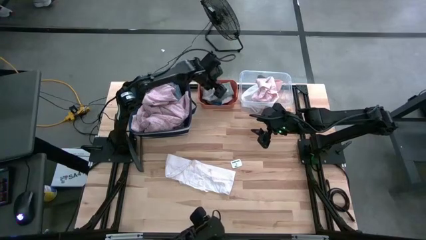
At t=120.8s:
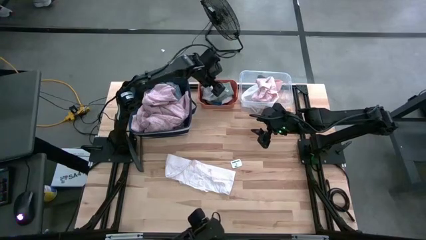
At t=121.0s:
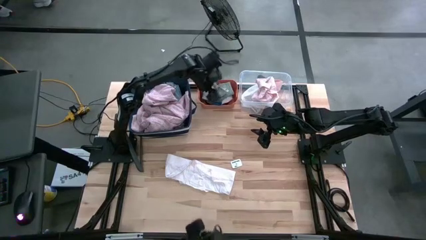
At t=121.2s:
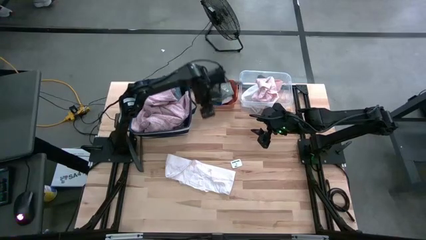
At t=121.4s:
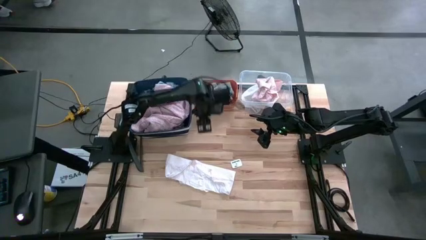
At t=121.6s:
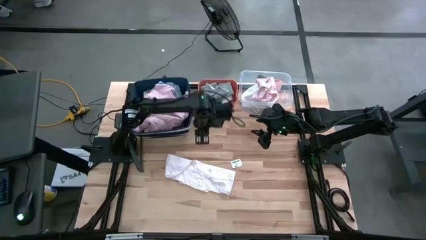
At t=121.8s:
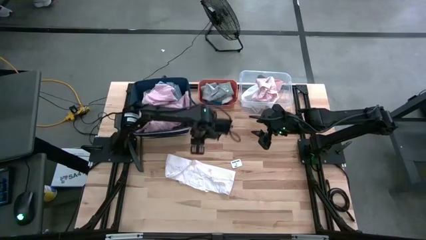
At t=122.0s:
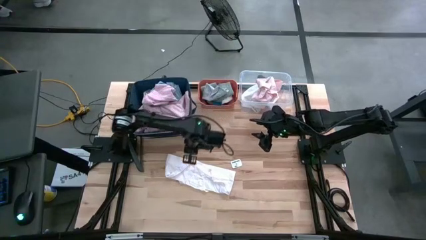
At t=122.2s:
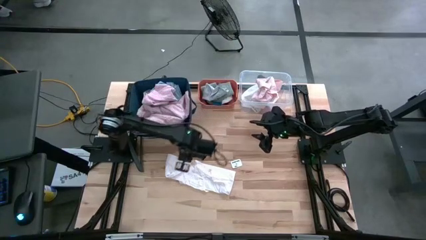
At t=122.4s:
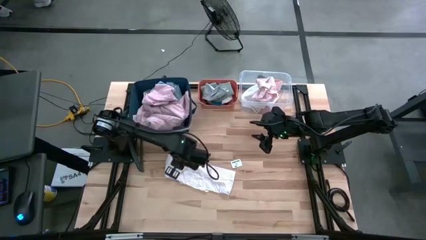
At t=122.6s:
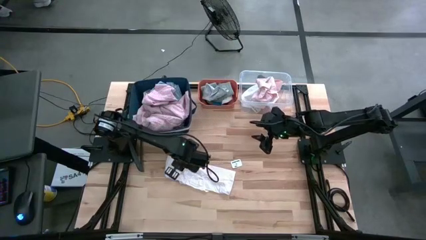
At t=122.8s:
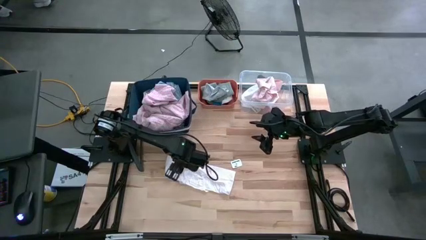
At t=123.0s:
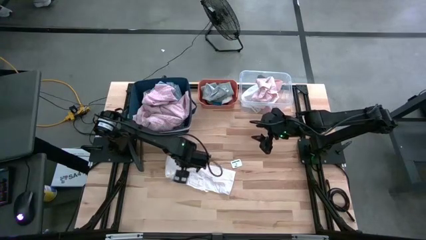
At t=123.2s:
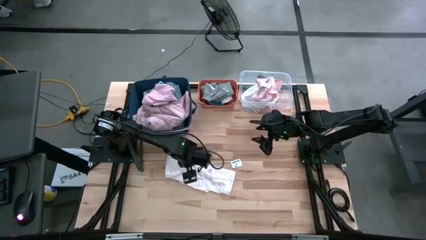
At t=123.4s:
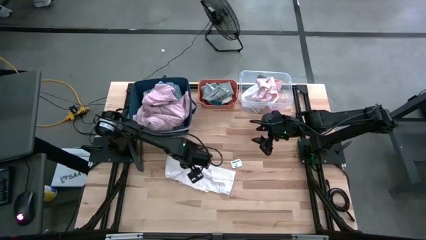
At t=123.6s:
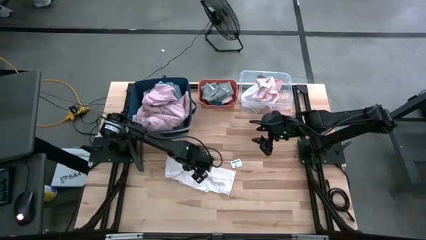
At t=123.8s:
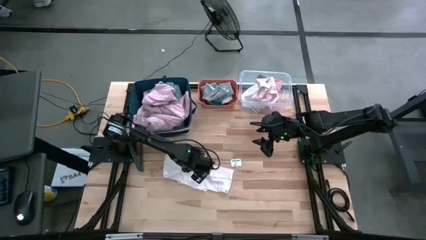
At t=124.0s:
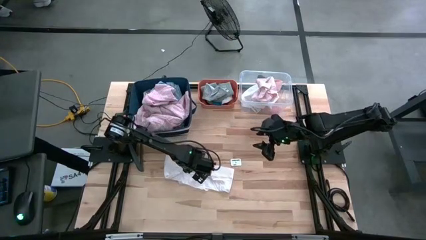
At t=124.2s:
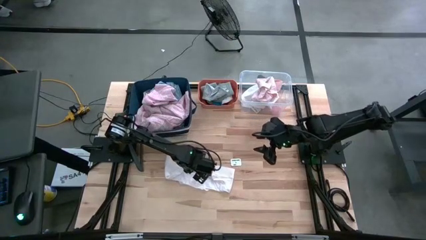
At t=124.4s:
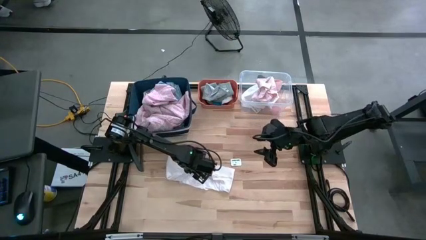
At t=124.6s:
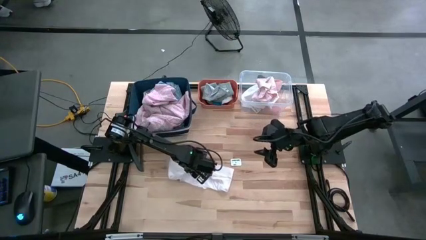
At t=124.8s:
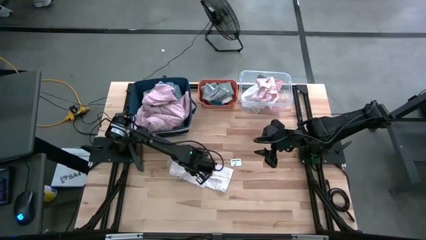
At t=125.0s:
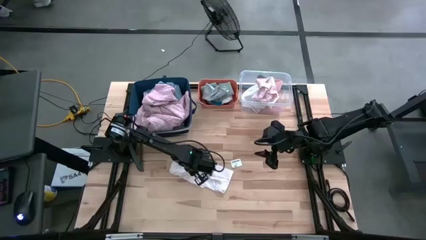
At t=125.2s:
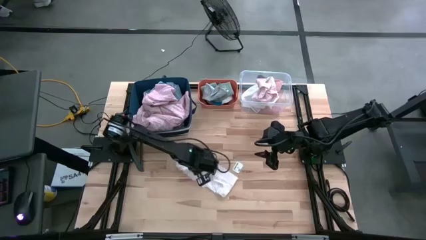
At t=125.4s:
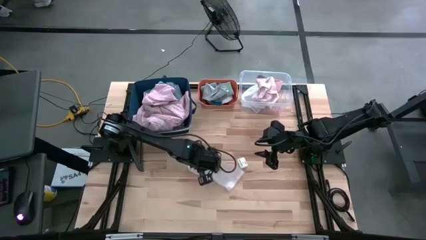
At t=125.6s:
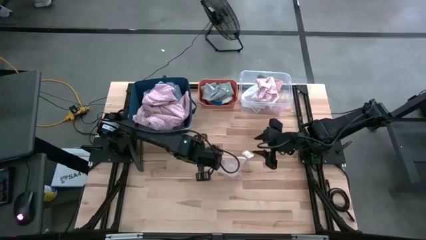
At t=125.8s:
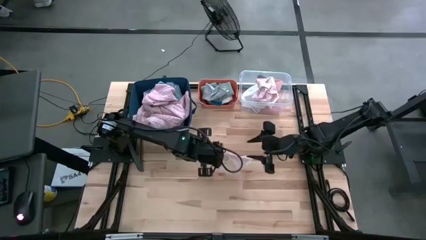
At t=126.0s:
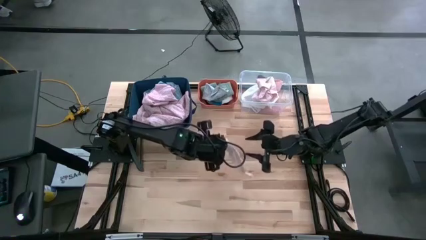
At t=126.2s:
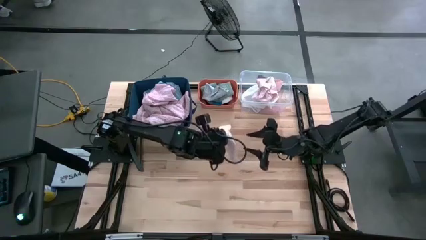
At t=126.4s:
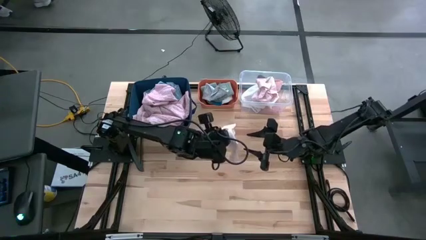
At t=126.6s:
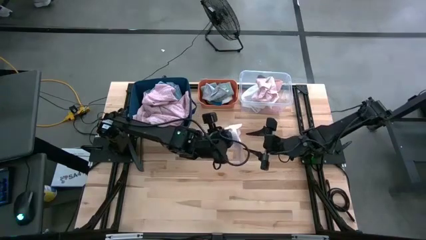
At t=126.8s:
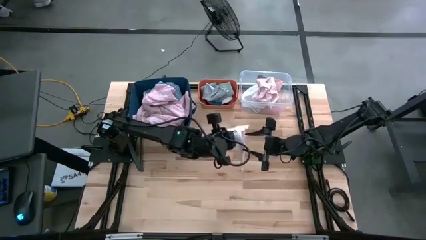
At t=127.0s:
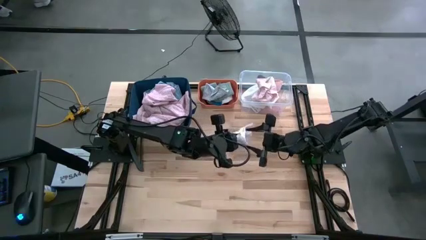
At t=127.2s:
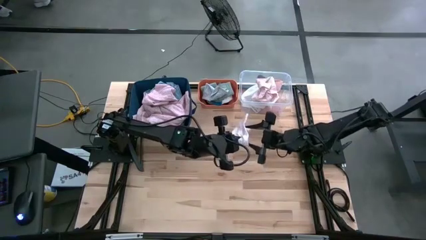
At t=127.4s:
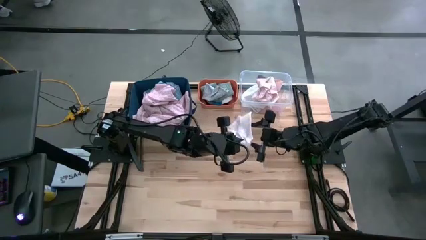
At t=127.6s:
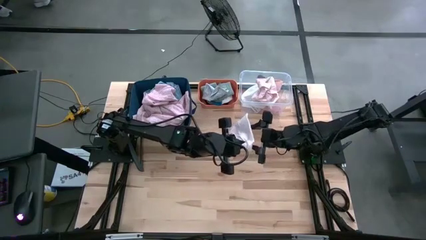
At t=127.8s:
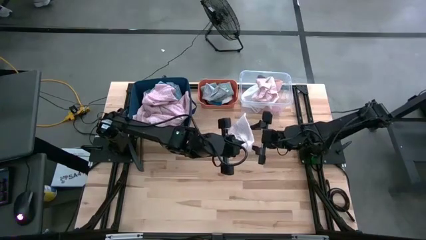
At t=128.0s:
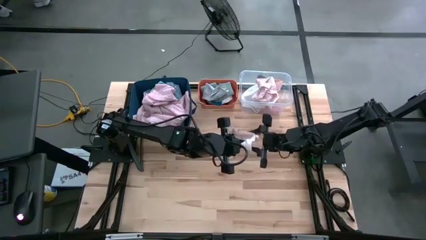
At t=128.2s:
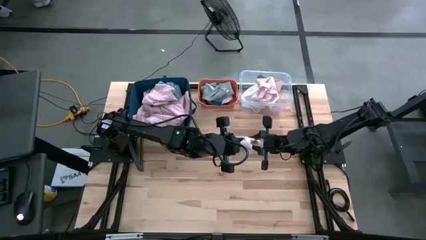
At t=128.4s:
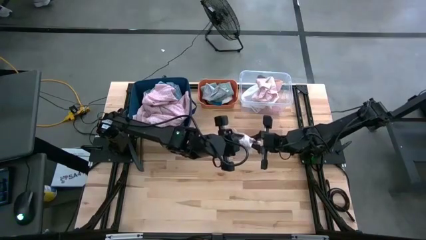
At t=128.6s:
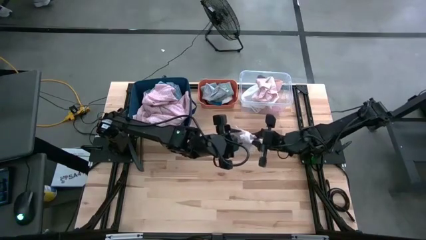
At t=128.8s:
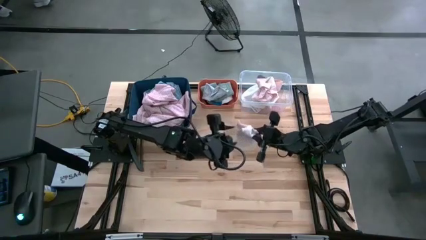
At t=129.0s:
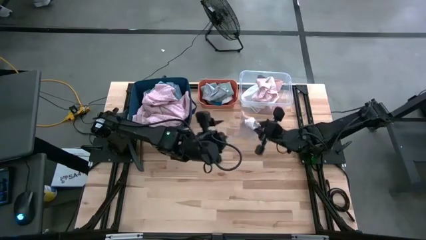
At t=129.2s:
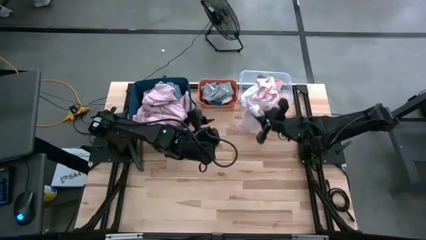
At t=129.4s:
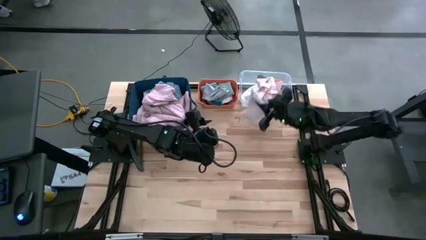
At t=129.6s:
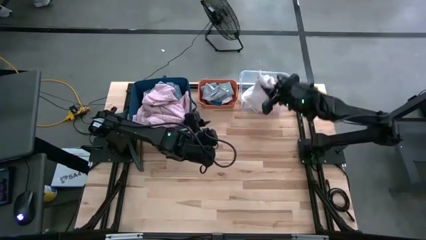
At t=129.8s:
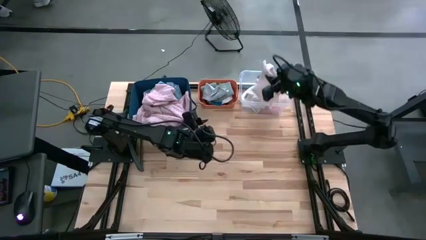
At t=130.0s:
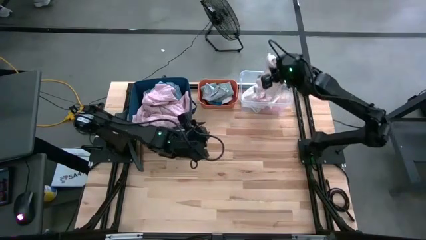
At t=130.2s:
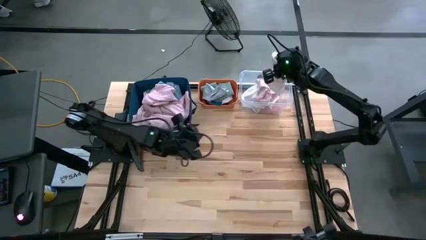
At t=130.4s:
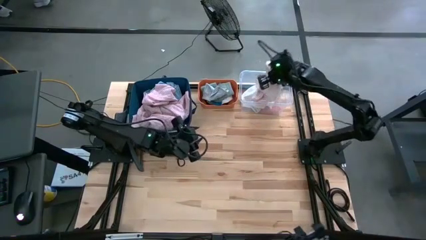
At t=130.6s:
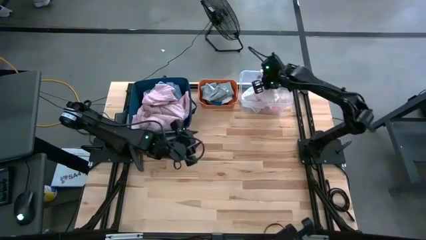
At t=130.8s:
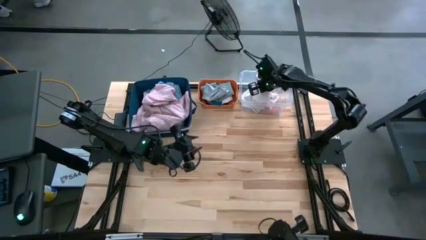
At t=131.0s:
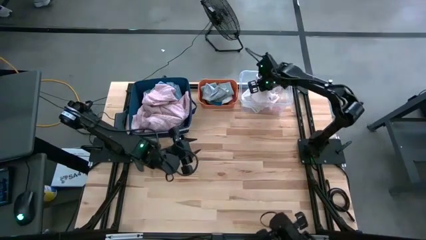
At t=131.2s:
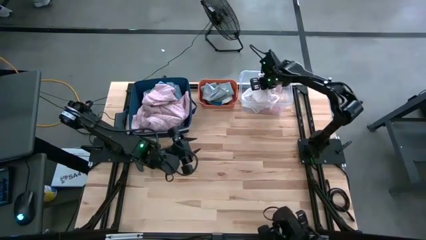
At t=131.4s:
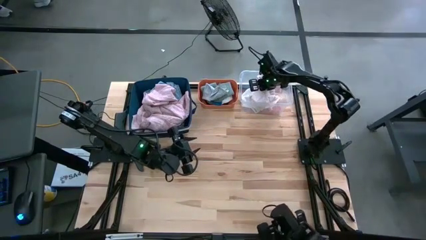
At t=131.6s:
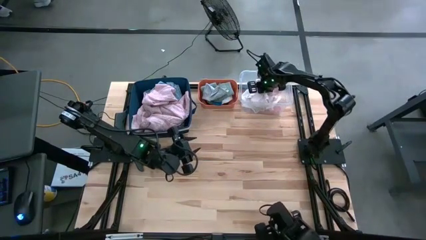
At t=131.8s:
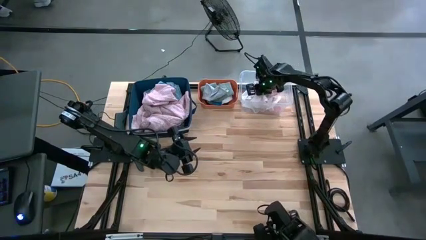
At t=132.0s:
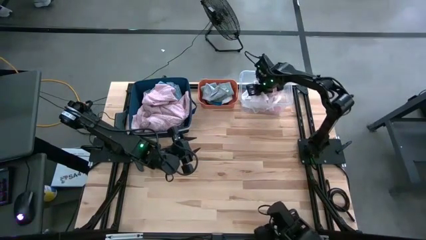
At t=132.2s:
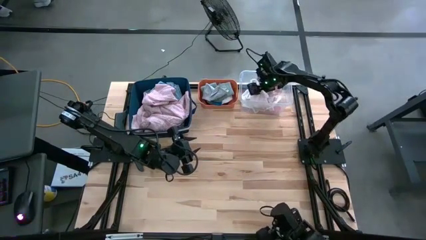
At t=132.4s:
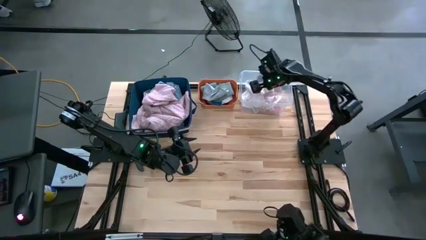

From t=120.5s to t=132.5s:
Task: Pick & Place Cloths
Put the light pink underwear into the transparent bin

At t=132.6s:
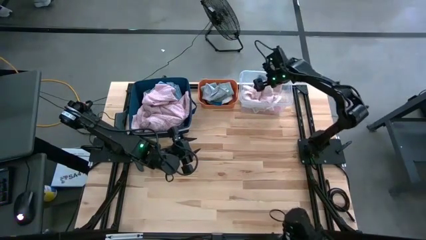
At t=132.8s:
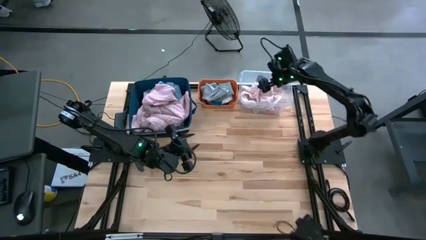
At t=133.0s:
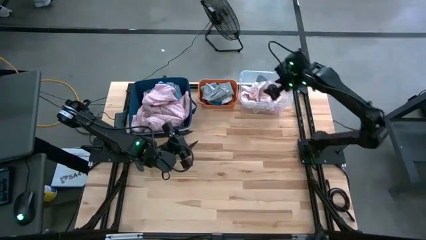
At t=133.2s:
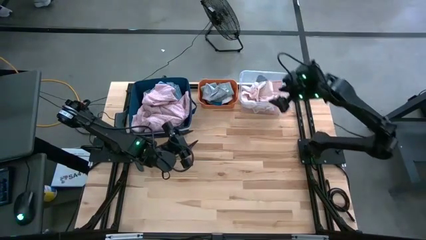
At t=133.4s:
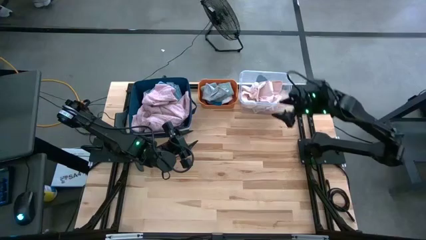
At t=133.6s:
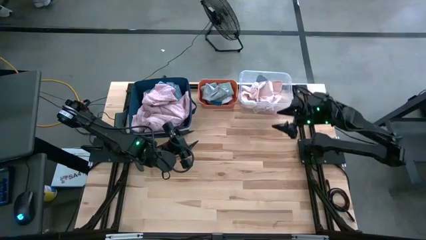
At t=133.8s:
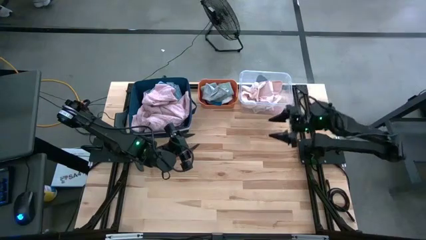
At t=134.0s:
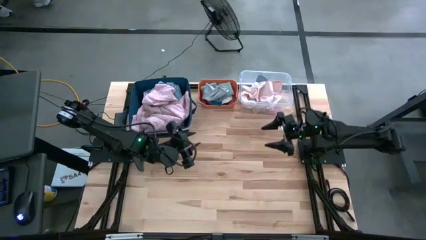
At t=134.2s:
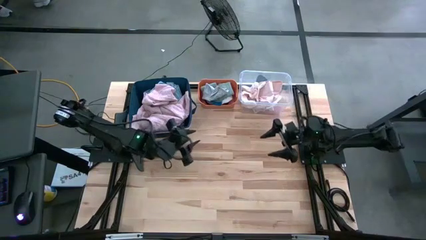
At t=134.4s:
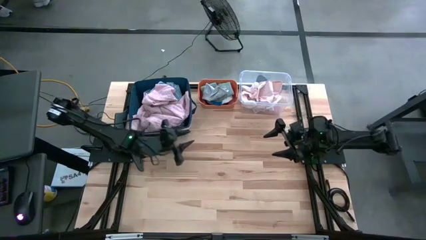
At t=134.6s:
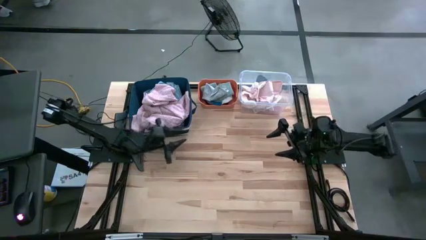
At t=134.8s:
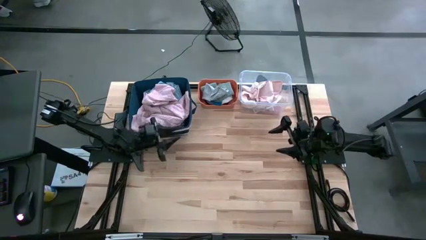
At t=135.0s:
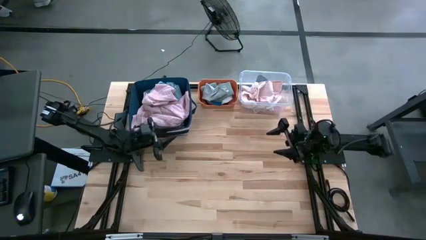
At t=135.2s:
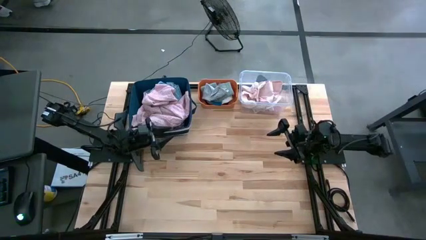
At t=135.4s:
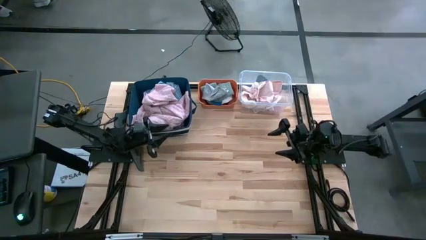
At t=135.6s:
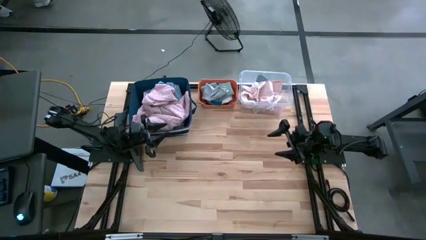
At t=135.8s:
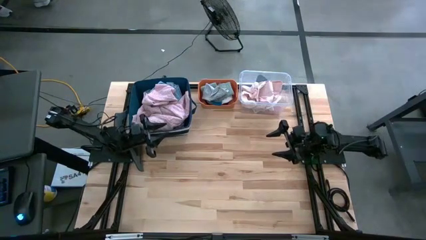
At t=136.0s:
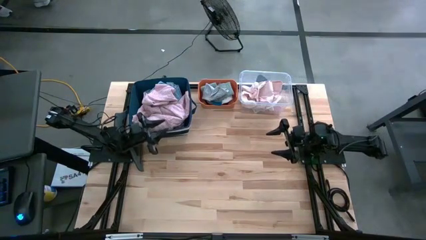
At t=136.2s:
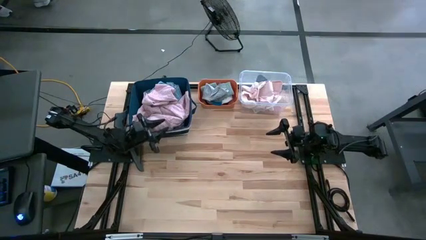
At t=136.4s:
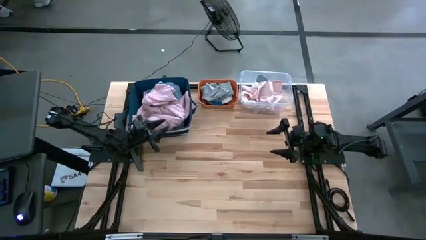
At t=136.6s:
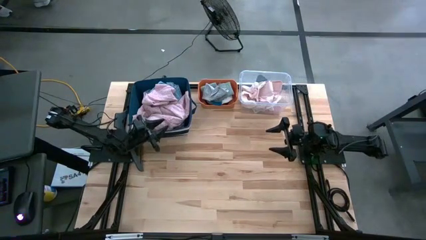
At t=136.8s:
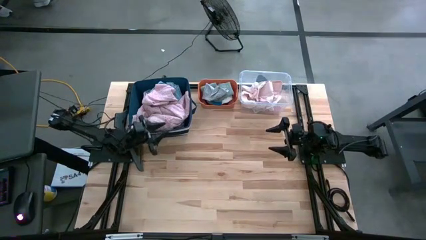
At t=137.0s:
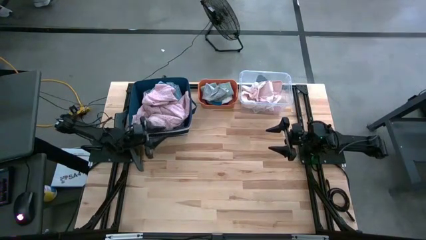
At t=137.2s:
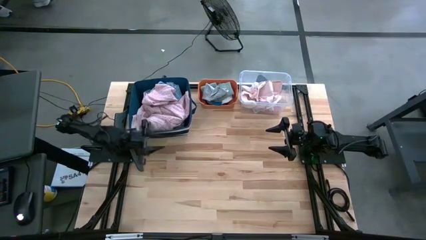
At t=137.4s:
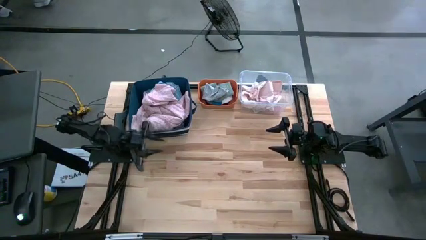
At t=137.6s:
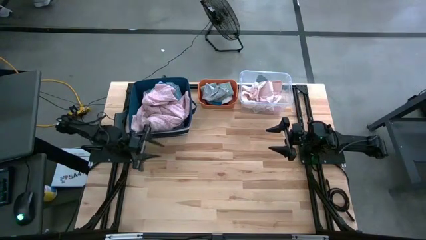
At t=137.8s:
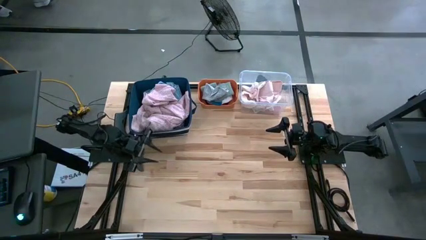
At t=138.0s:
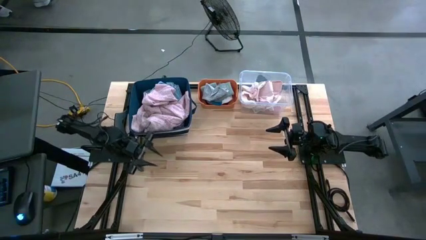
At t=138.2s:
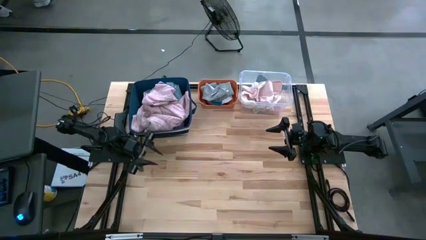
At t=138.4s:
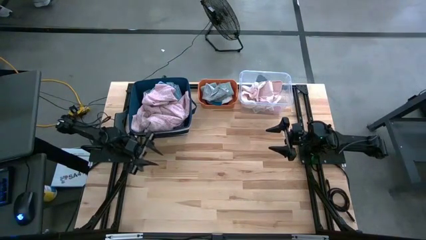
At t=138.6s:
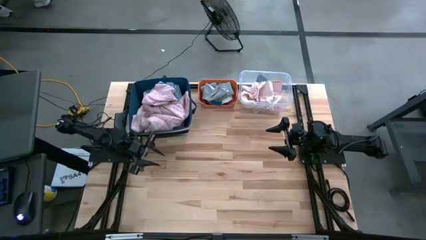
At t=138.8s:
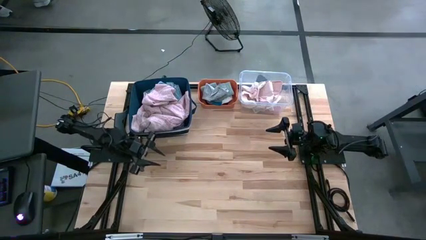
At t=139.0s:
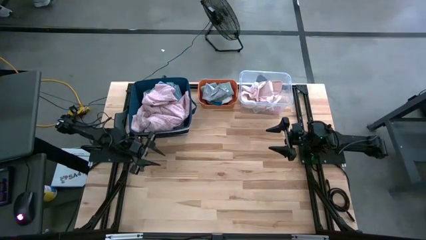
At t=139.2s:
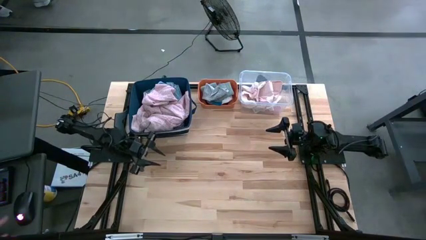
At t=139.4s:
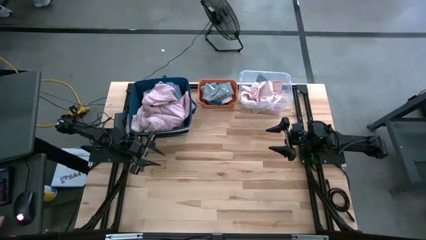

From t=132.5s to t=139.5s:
Return to Home Position
